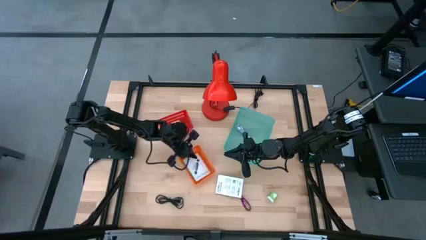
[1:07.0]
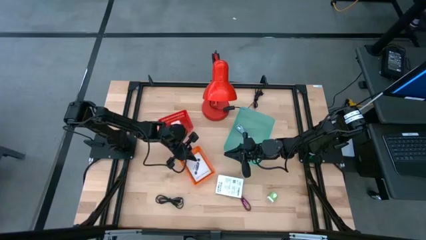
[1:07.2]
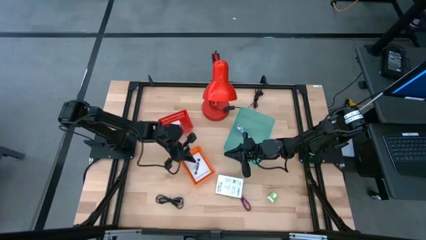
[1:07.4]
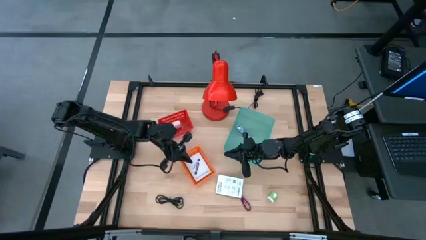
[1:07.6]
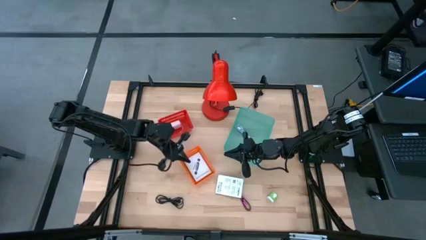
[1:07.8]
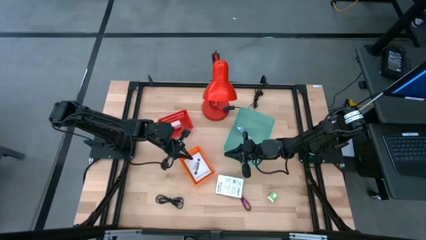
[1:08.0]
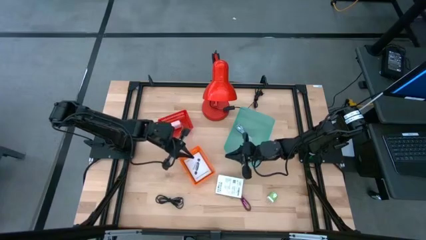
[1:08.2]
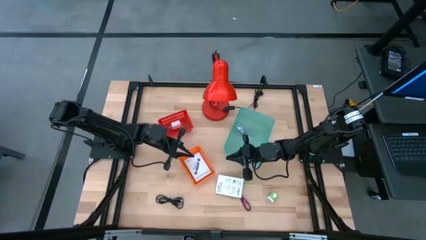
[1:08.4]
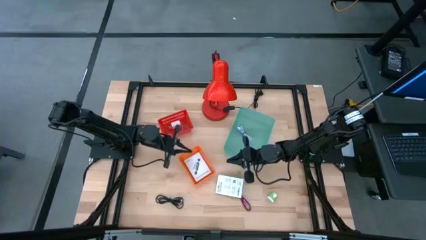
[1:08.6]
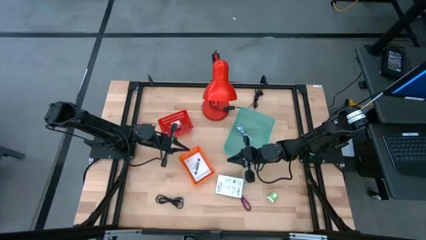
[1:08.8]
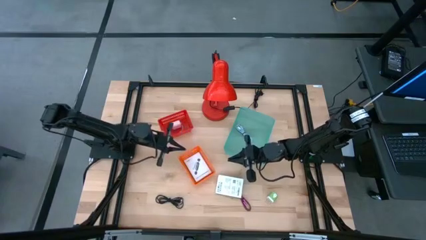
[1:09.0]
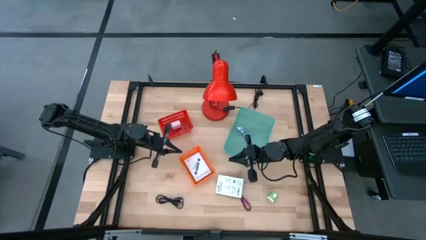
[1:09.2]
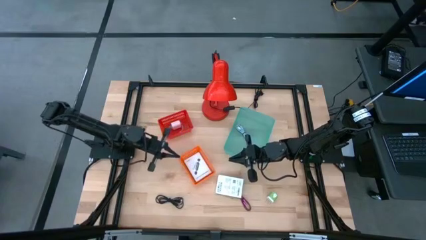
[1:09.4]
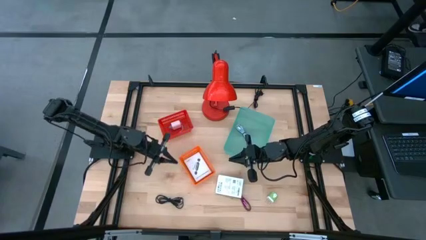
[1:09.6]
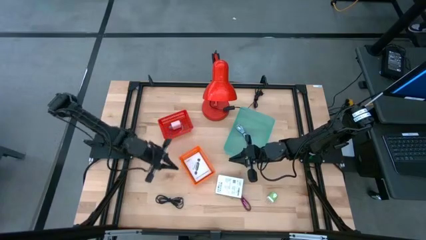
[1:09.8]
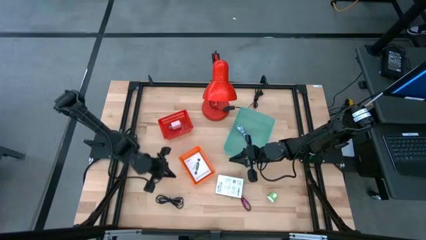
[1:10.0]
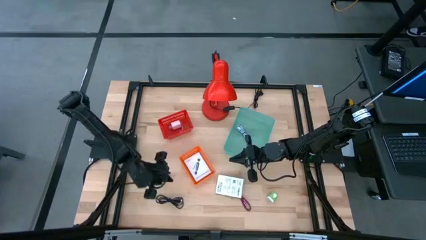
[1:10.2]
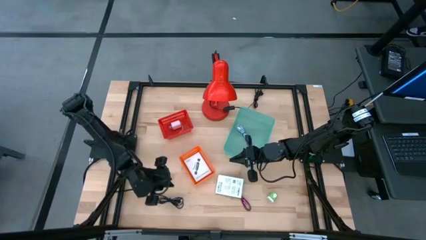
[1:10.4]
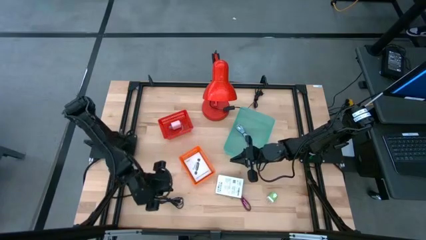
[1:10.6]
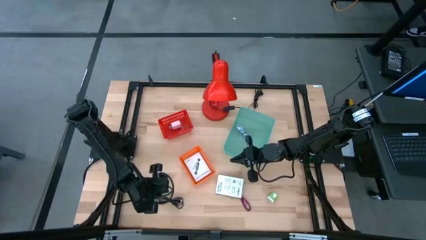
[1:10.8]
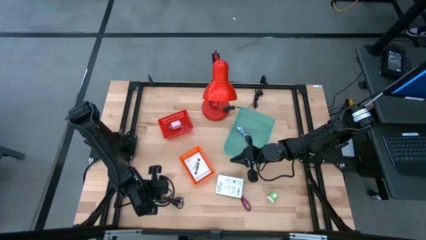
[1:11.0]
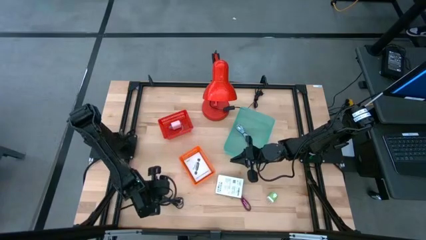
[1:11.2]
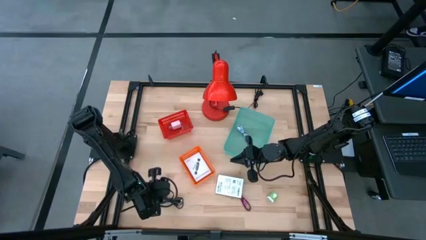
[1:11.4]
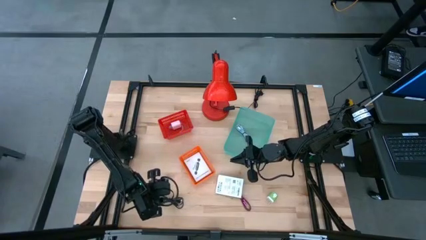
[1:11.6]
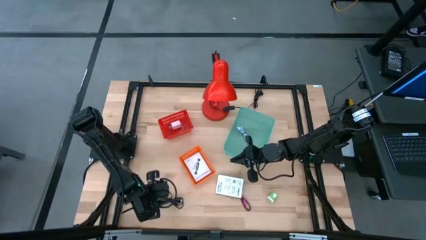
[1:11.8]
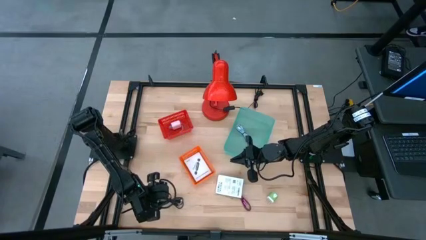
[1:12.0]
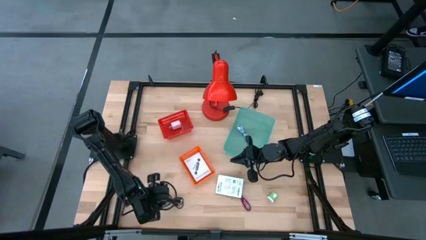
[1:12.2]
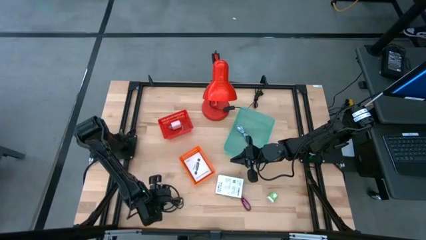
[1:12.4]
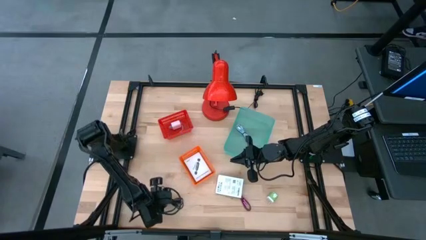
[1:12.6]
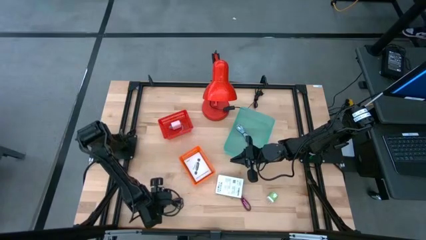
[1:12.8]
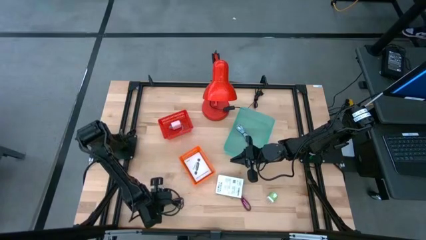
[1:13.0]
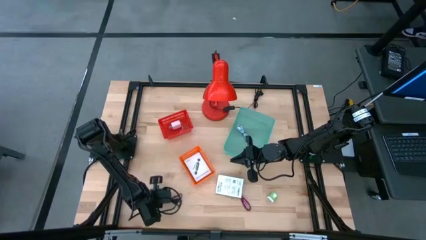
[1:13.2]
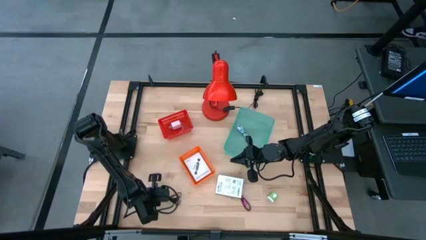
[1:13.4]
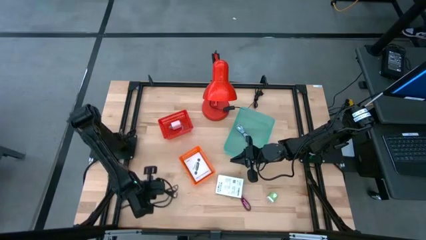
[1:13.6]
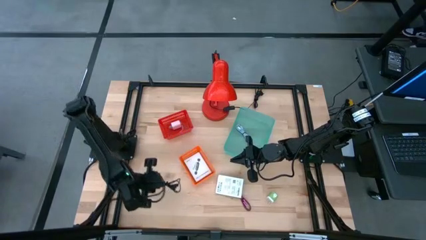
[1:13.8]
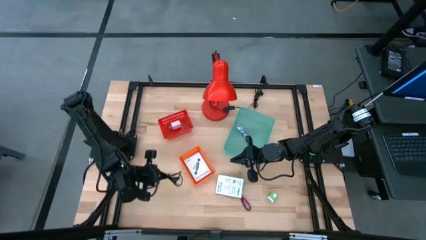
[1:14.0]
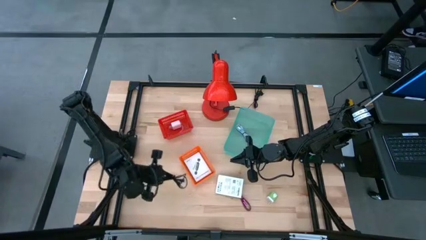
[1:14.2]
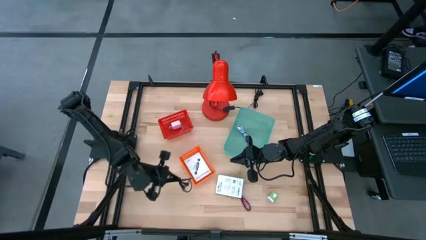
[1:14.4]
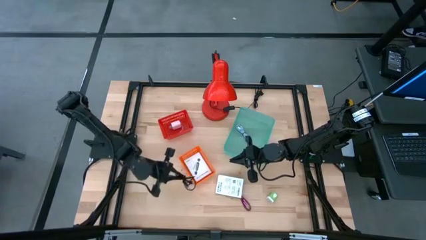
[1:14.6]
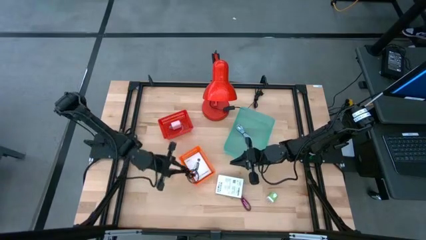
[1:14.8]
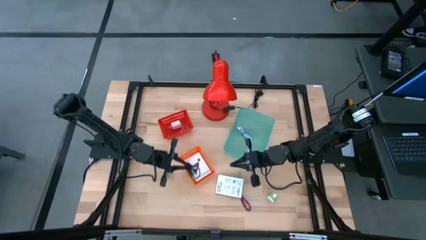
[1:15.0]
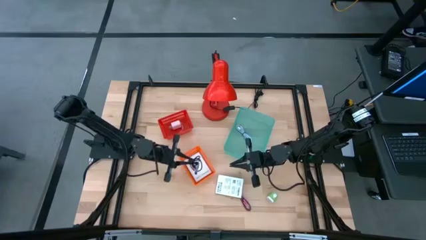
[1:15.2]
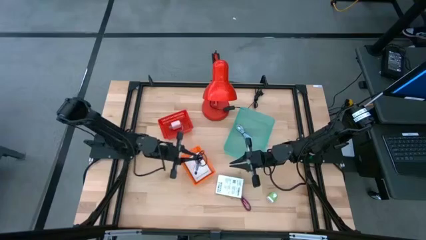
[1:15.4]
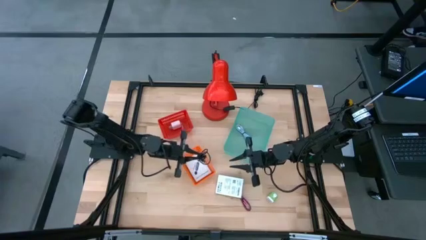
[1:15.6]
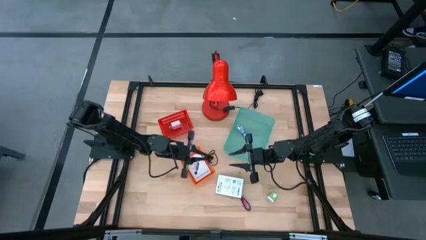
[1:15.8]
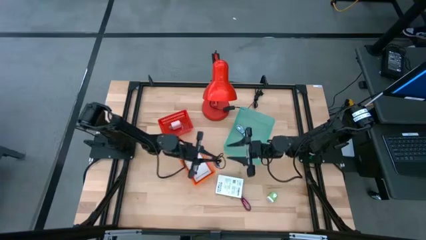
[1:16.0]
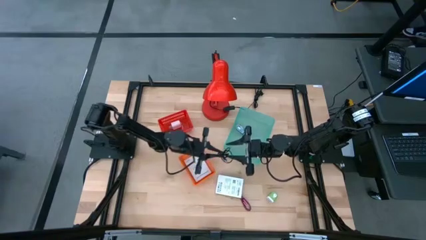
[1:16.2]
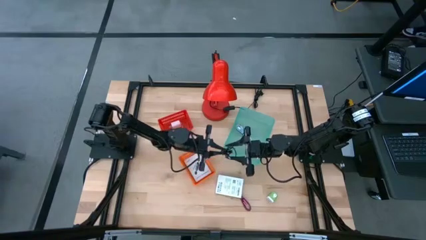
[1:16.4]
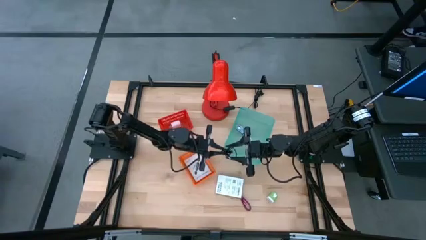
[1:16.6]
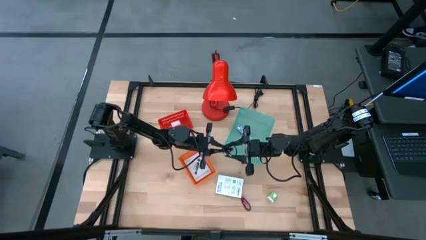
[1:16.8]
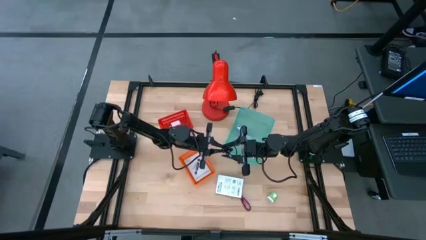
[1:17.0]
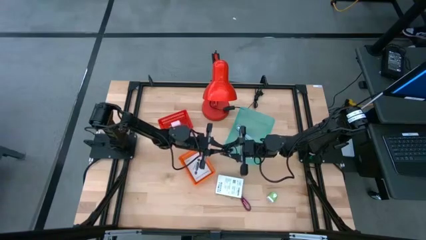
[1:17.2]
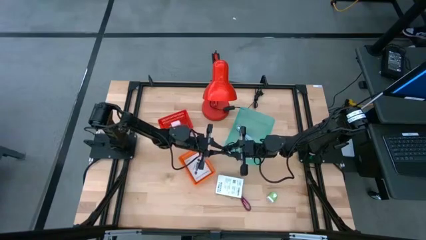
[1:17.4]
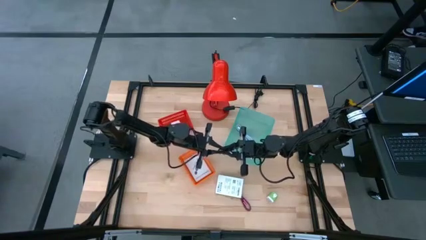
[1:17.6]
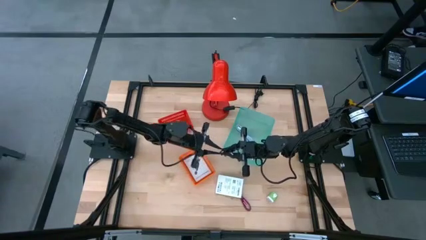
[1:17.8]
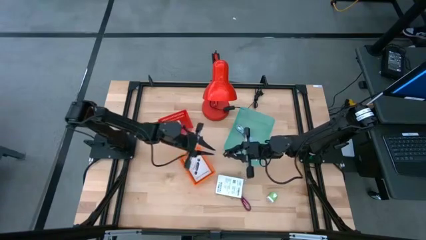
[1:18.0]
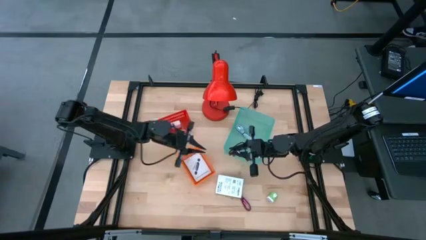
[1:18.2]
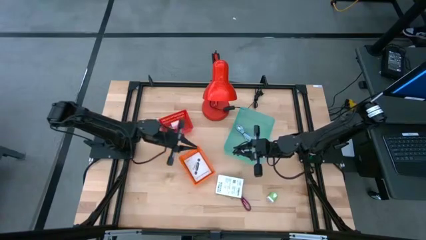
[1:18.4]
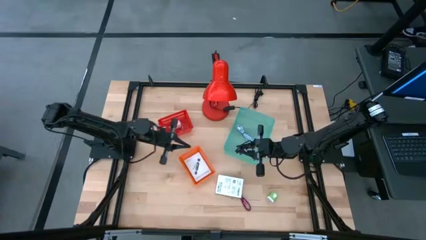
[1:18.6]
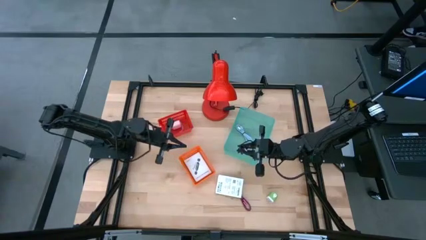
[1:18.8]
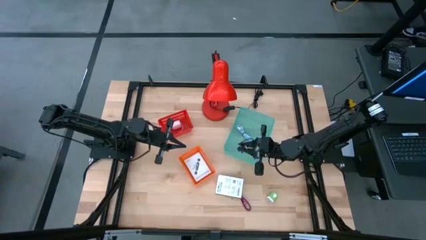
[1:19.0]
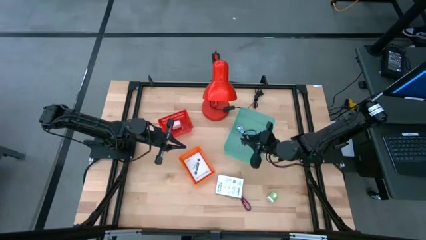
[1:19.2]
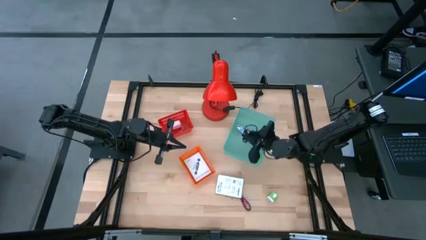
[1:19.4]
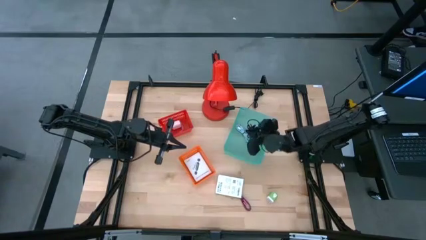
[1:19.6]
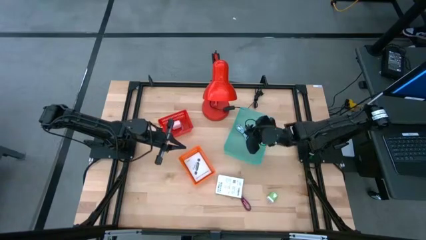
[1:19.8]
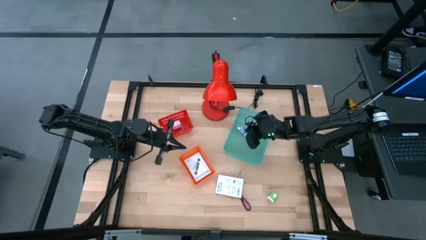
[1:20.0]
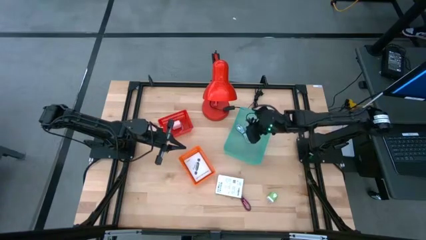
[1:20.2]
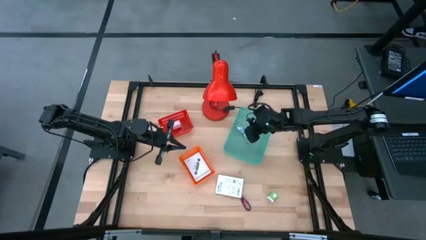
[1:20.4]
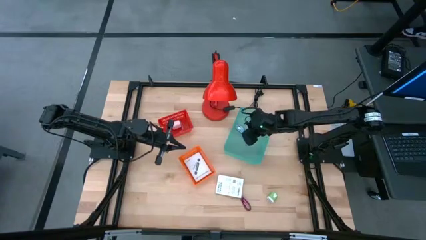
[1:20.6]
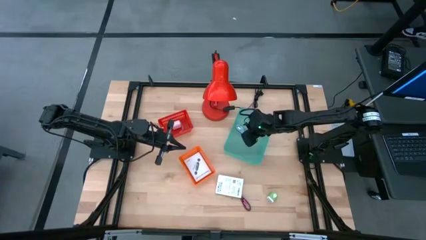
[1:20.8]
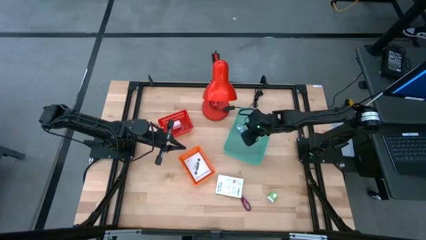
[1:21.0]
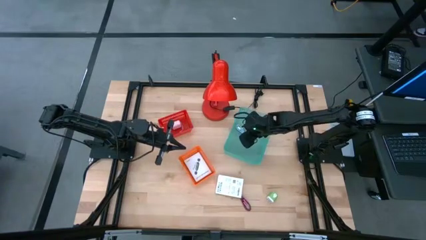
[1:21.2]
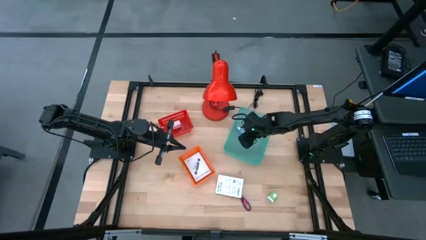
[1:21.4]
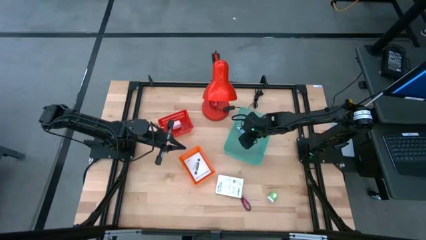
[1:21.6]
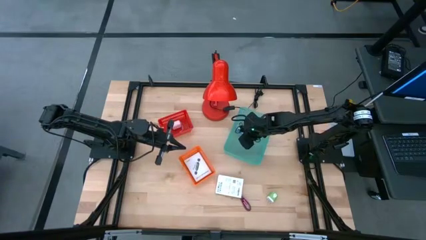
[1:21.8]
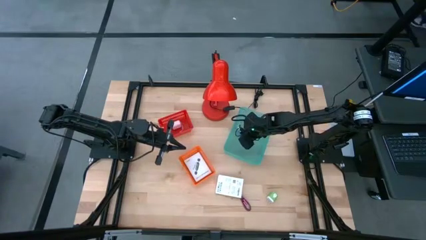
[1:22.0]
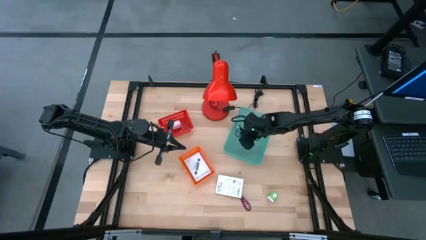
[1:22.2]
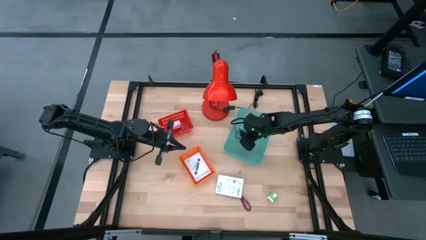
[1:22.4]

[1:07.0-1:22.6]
Task: Pick and place items into bin
Put the black charger cable into the blue bin
